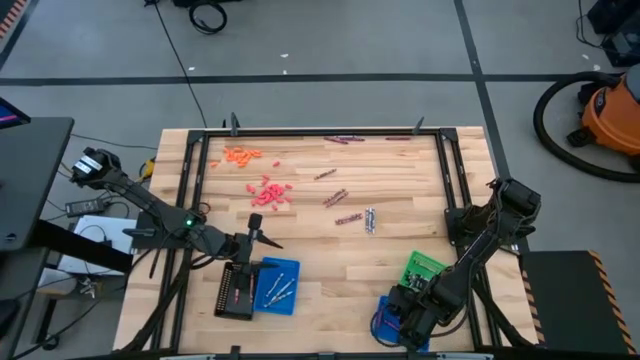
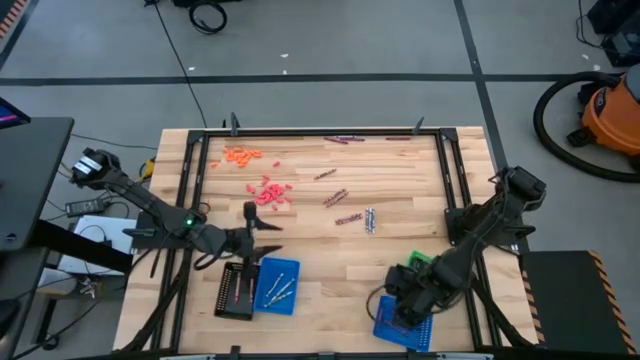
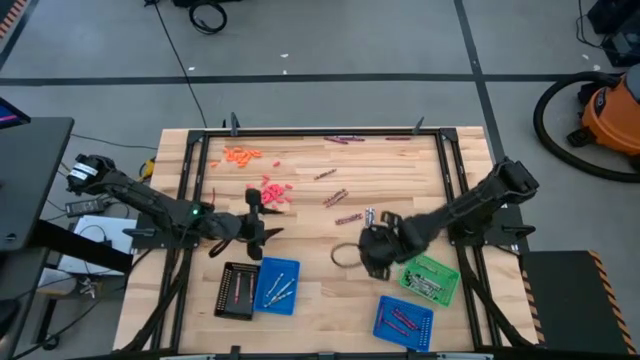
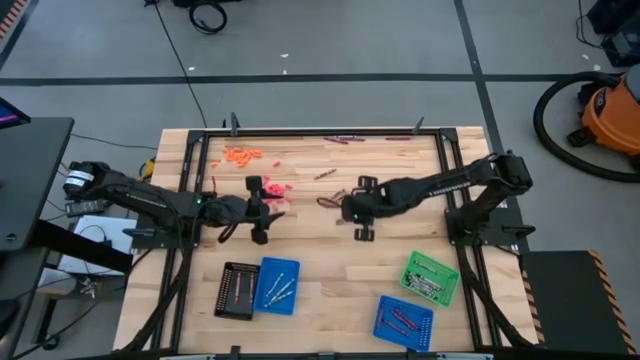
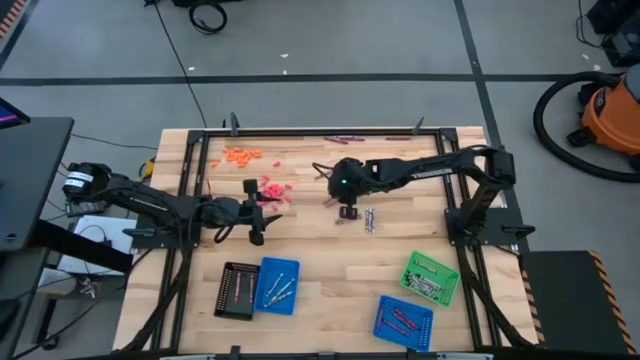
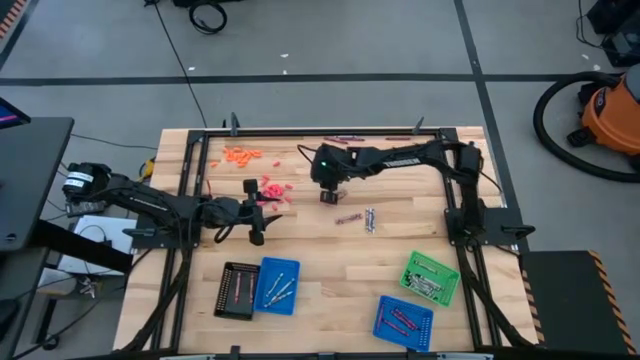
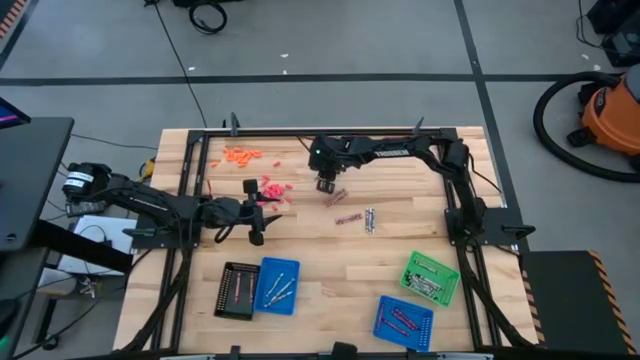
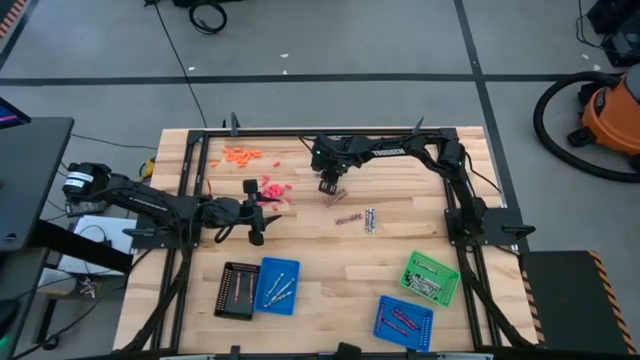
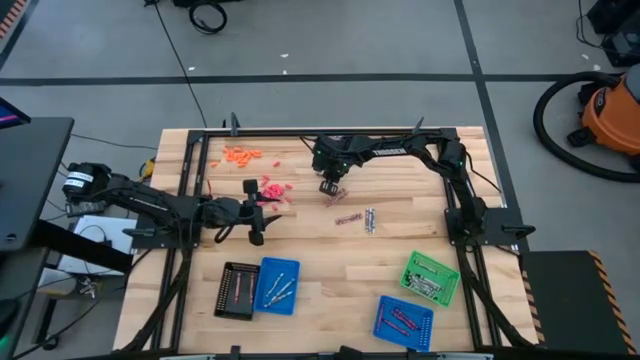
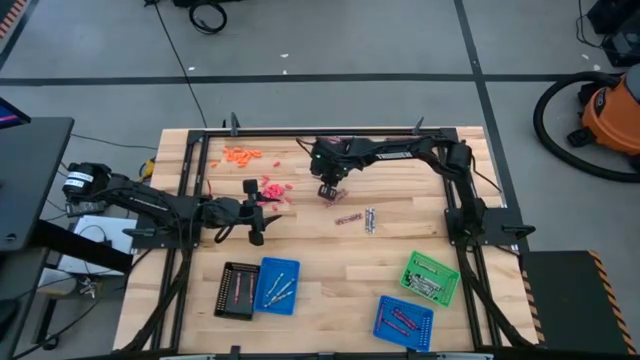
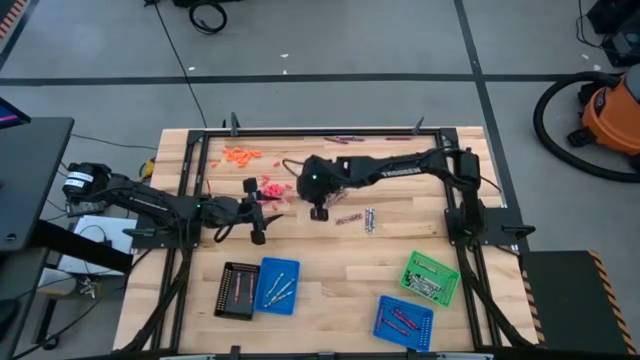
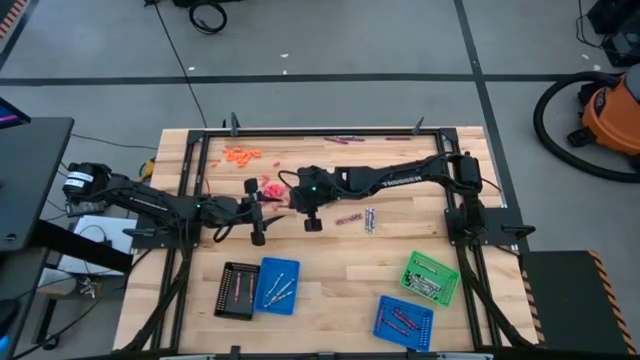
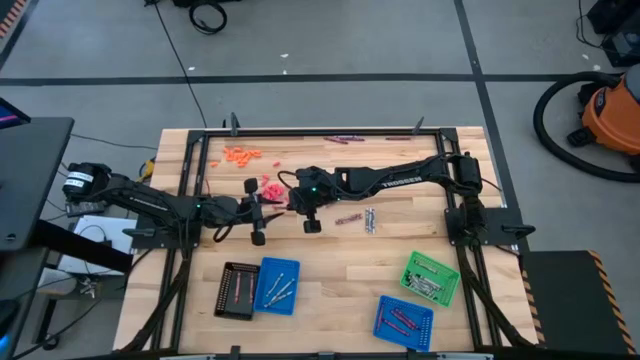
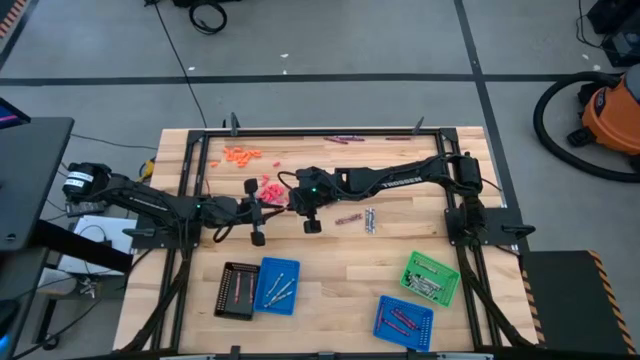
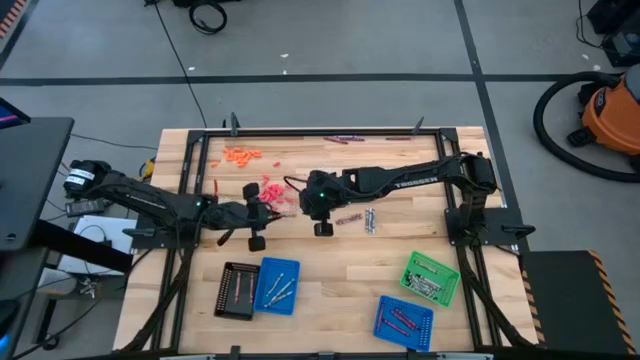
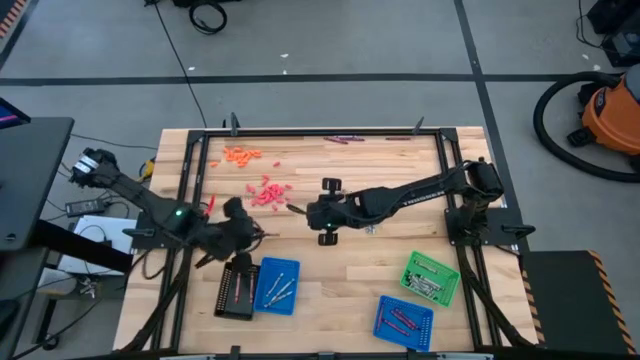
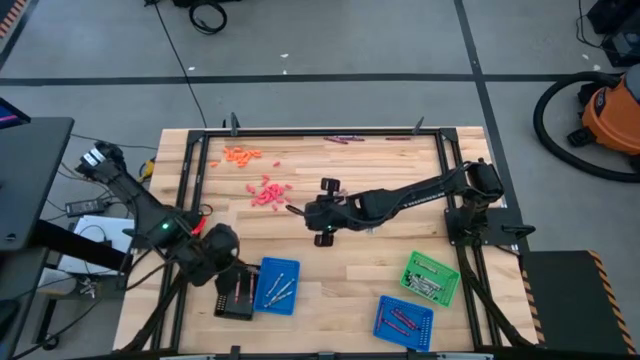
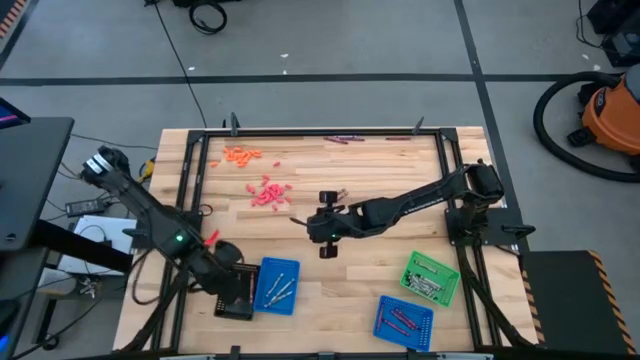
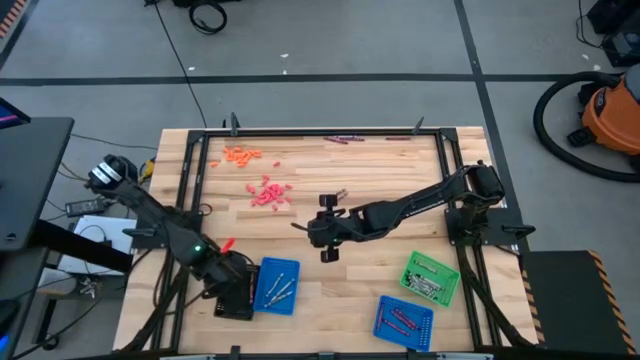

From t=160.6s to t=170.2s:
Task: Sort crayons
Put the pink crayon into the black bin

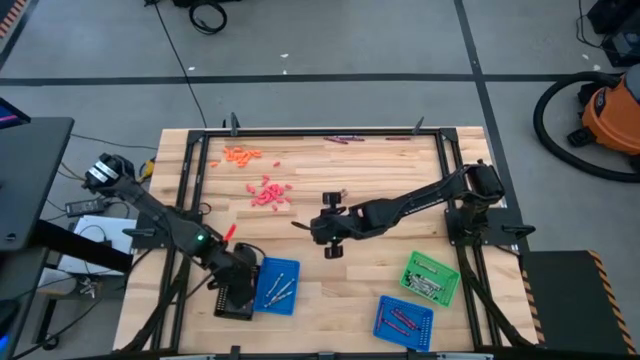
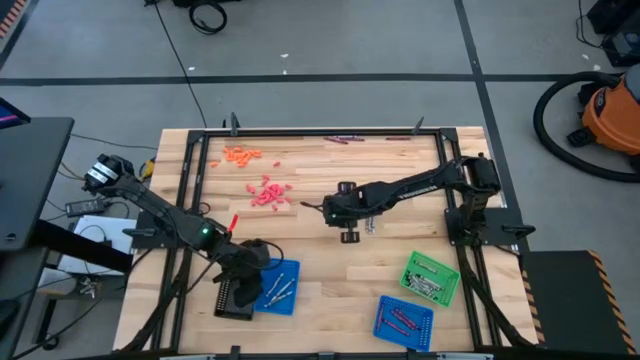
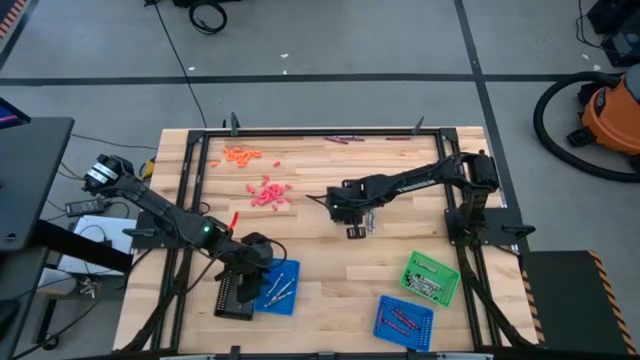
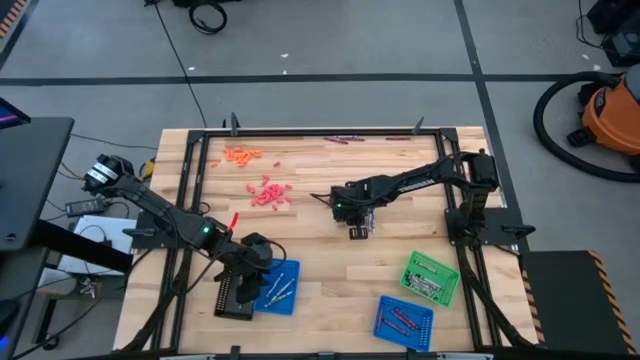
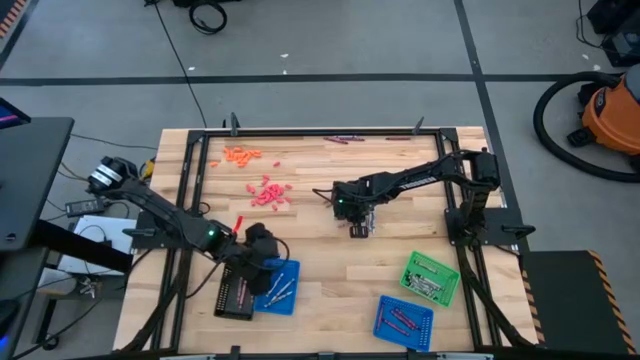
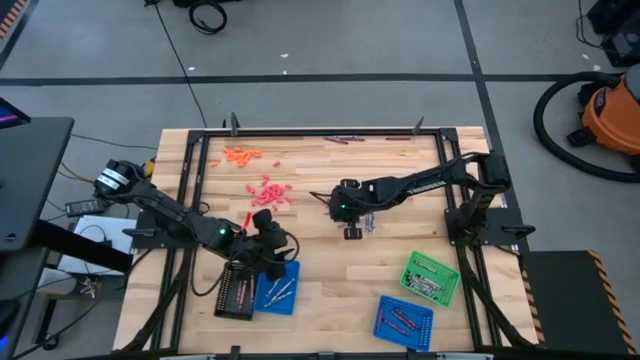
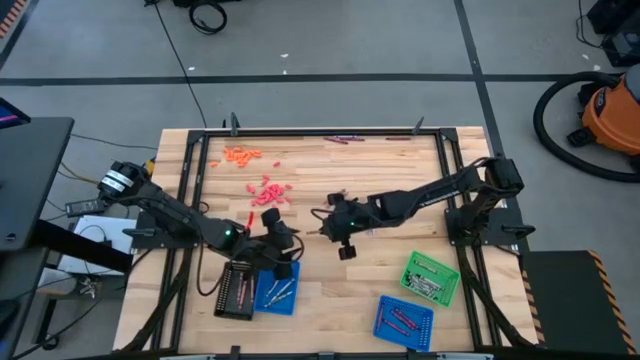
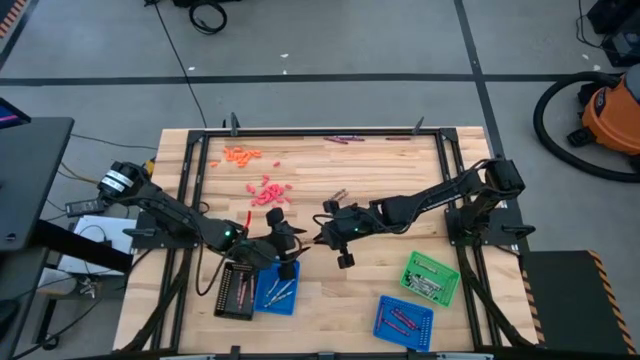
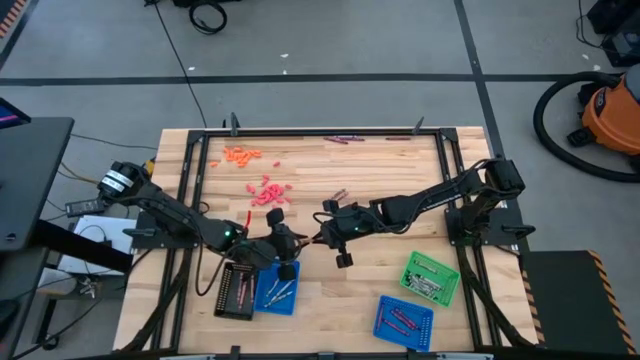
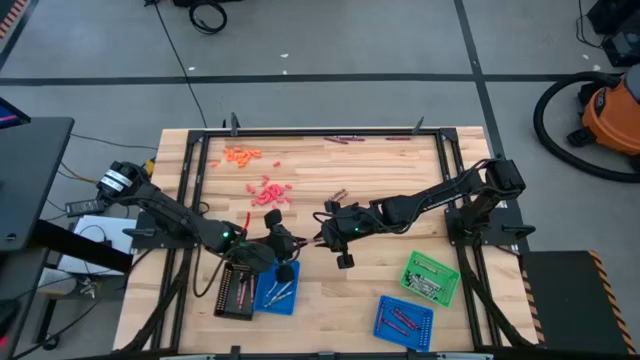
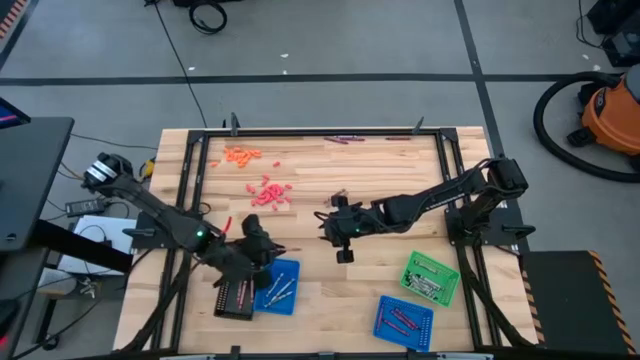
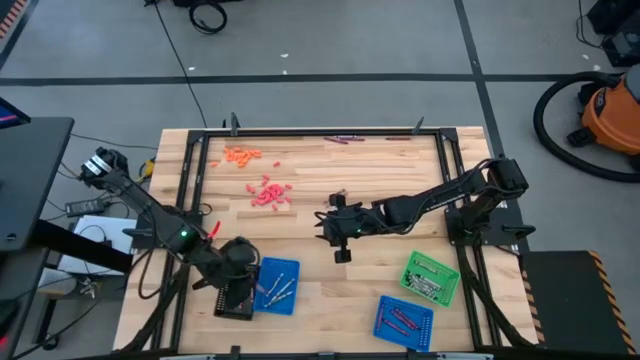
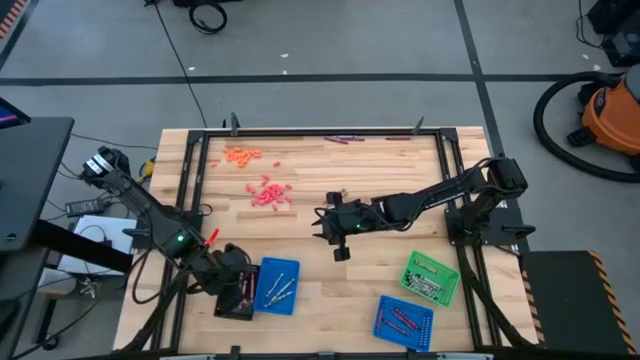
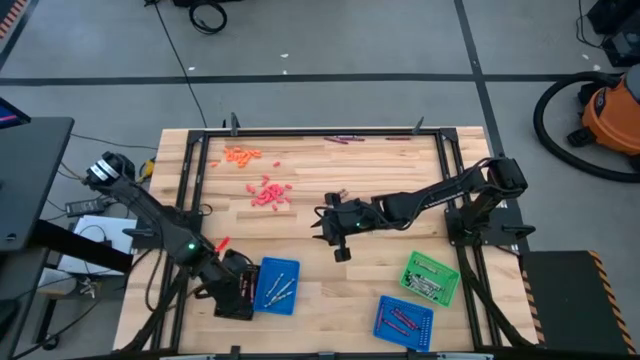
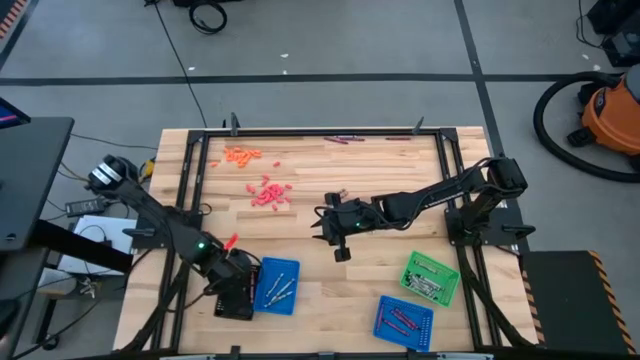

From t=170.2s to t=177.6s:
Put the pink crayon into the black bin

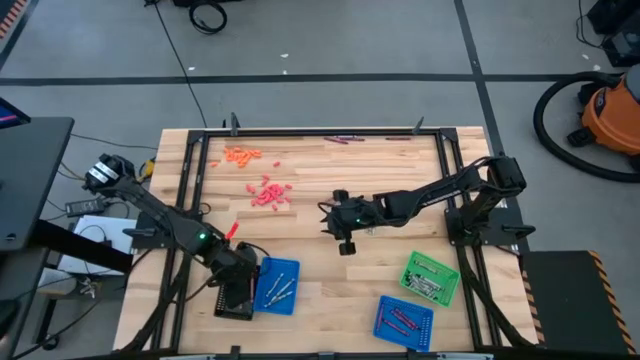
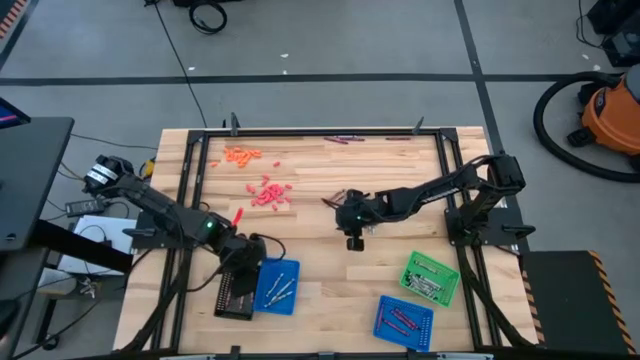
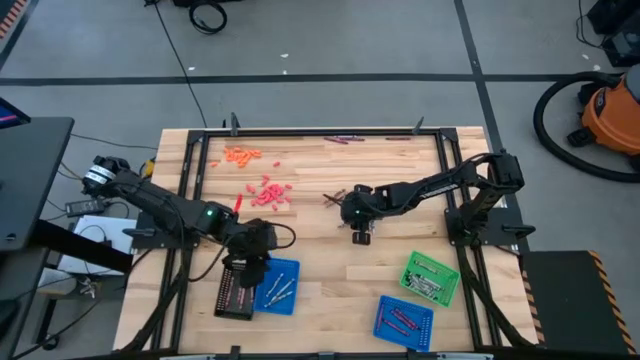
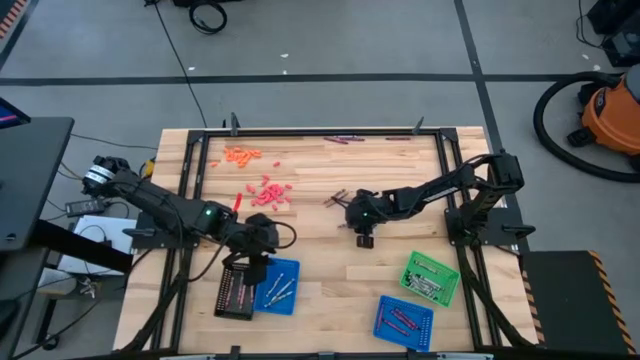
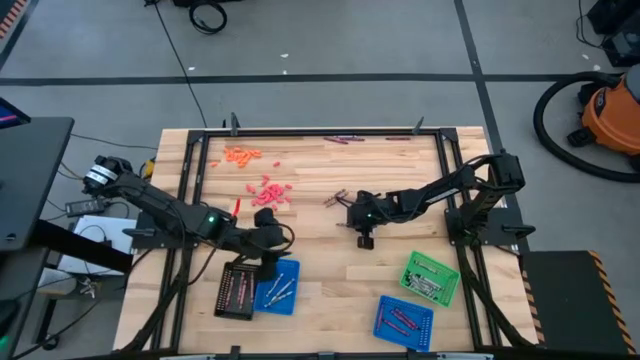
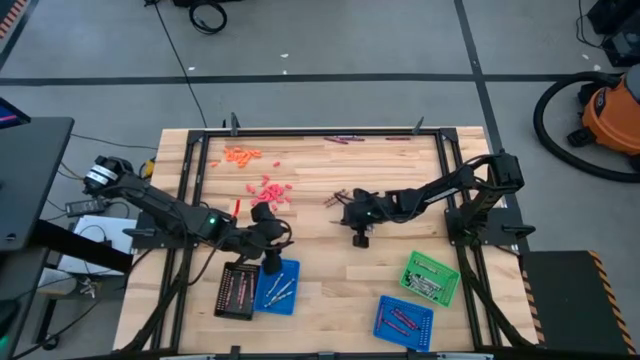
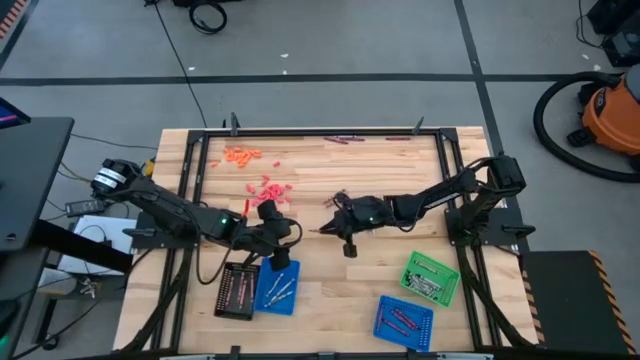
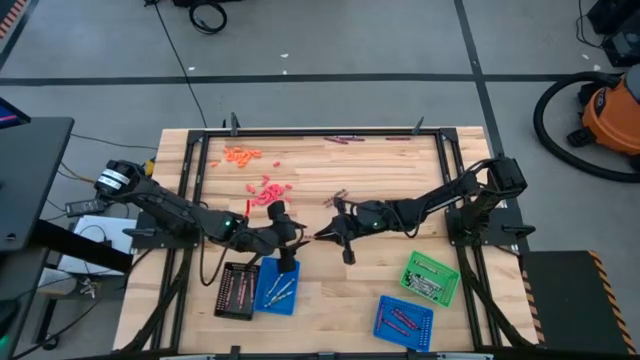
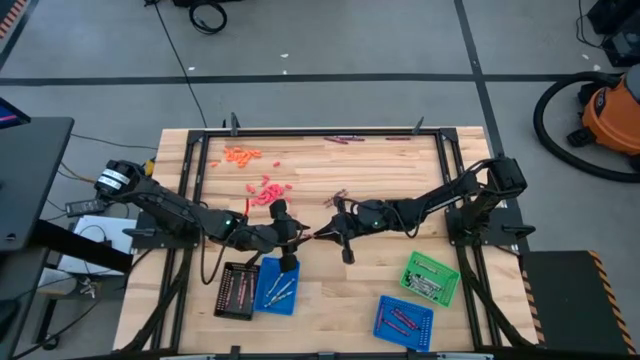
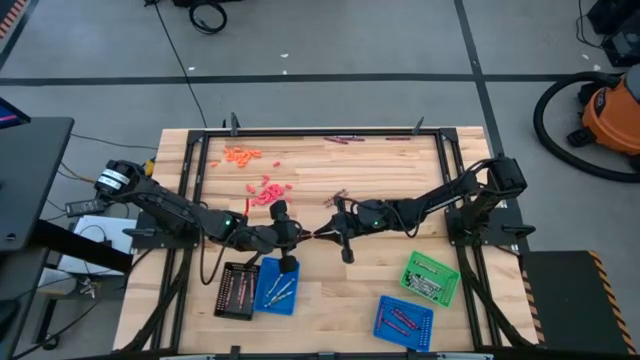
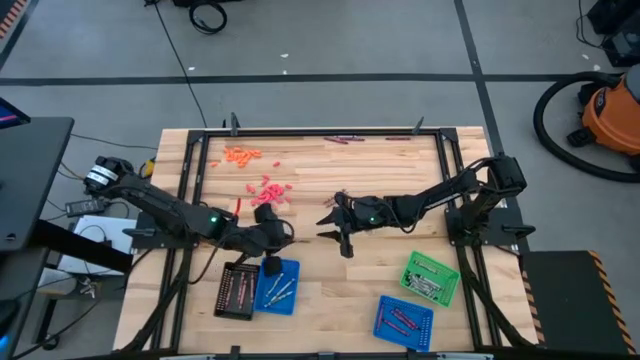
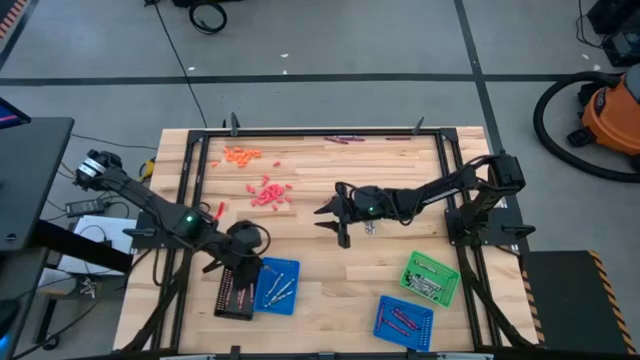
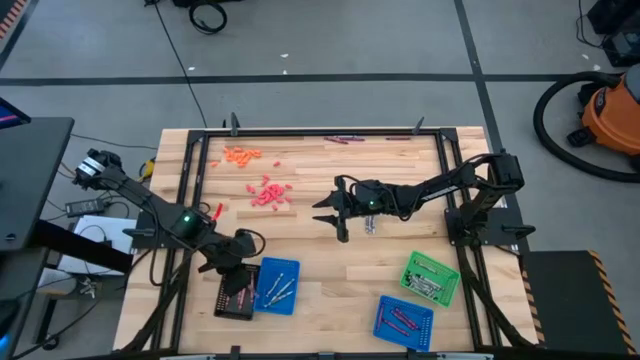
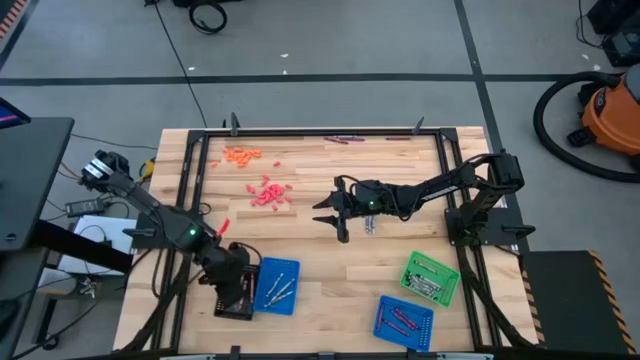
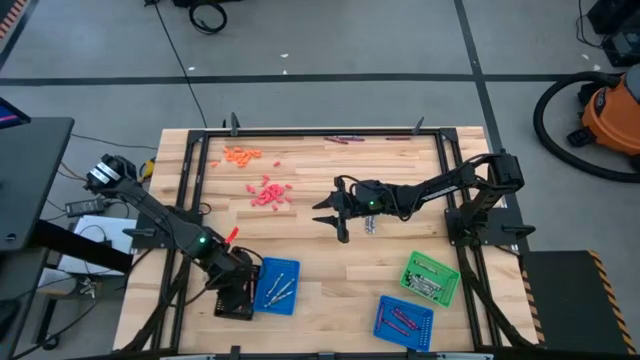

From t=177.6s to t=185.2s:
Put the pink crayon into the black bin
